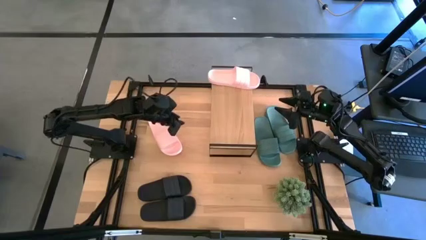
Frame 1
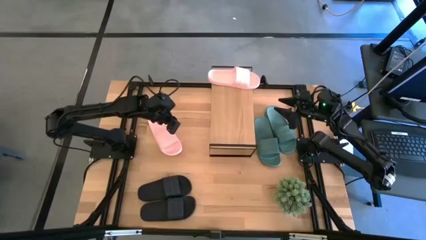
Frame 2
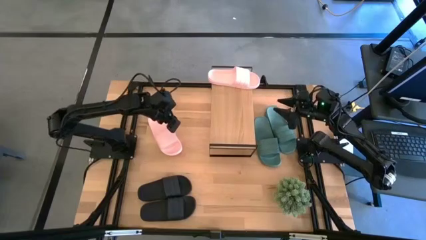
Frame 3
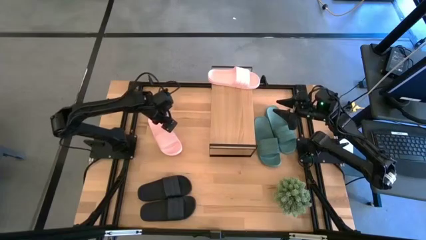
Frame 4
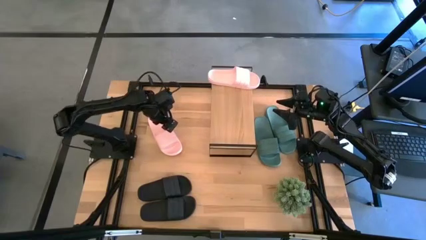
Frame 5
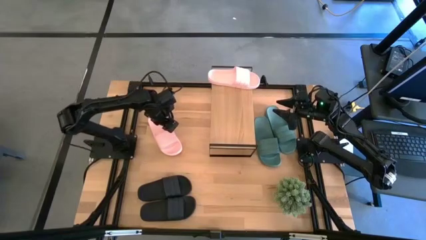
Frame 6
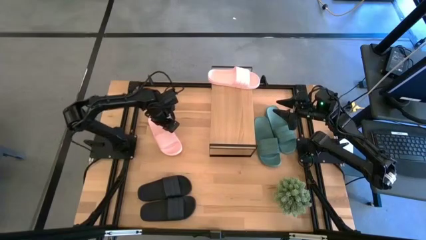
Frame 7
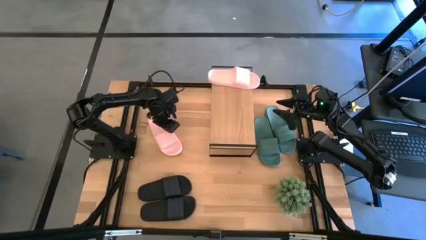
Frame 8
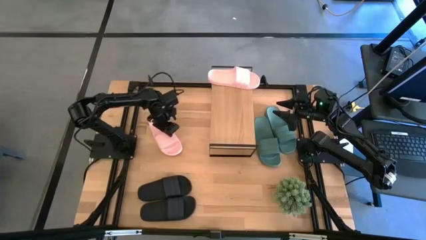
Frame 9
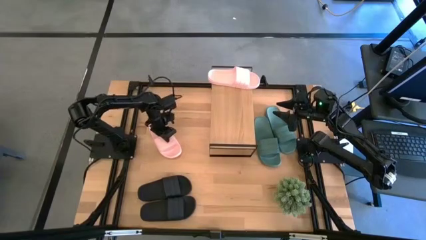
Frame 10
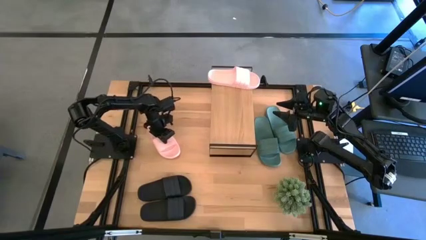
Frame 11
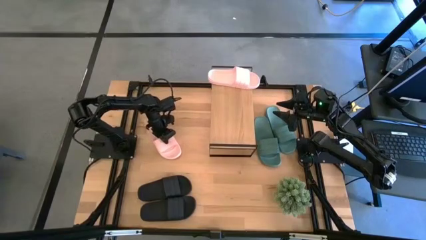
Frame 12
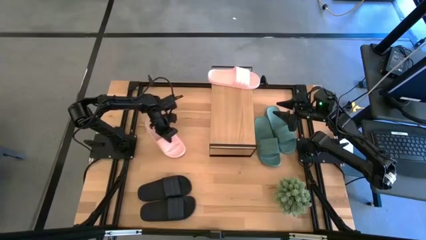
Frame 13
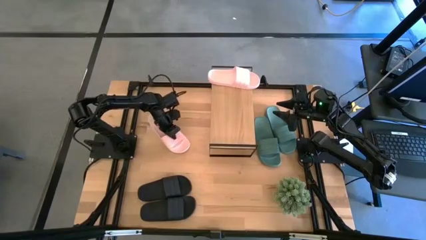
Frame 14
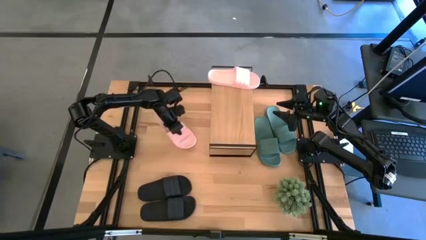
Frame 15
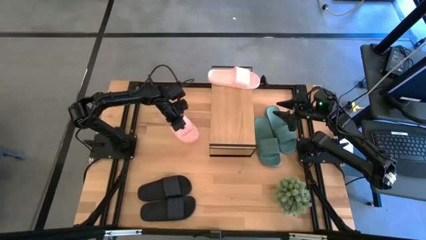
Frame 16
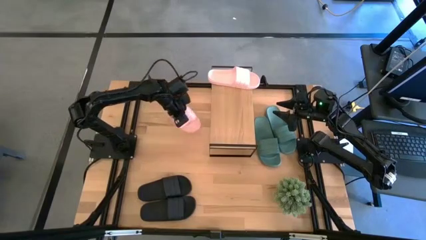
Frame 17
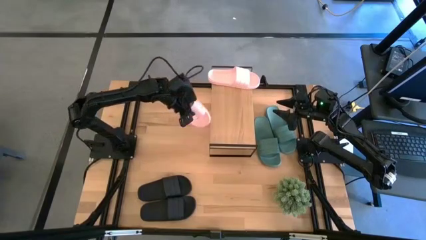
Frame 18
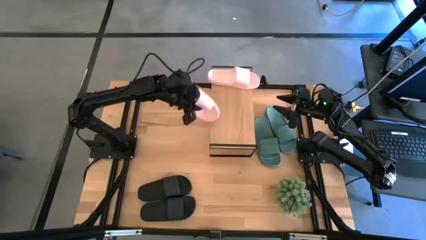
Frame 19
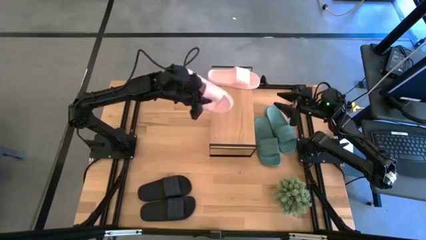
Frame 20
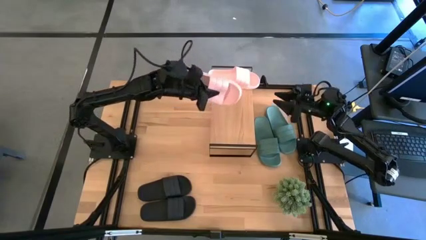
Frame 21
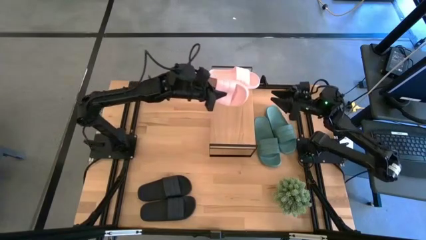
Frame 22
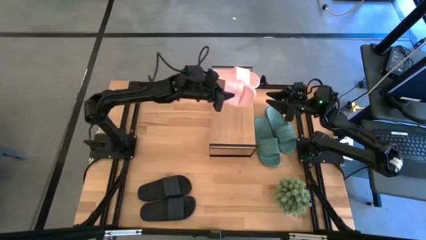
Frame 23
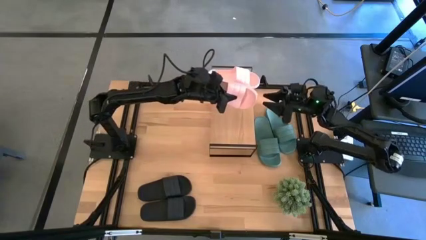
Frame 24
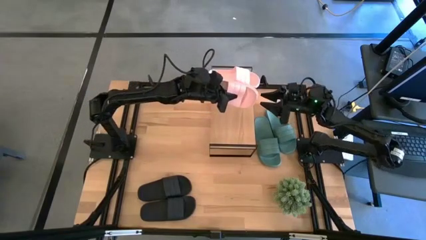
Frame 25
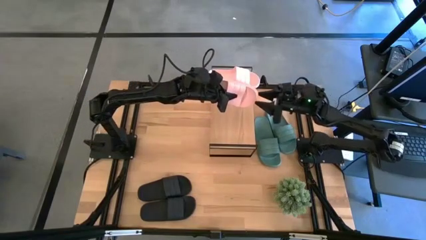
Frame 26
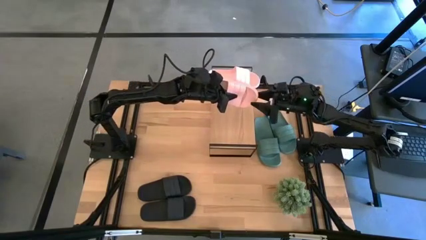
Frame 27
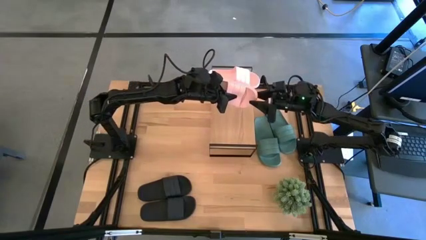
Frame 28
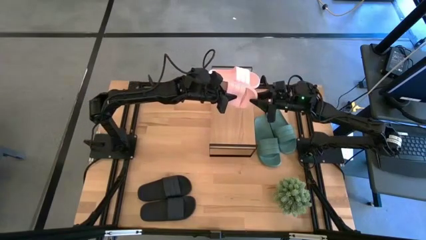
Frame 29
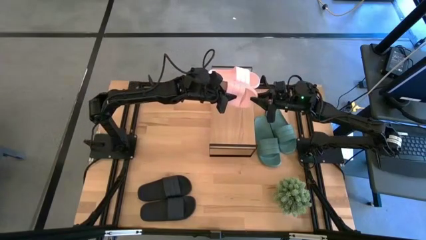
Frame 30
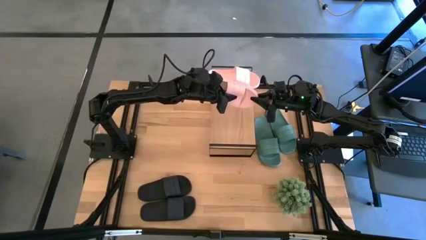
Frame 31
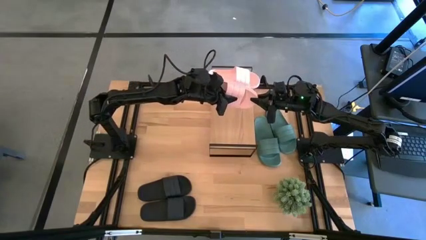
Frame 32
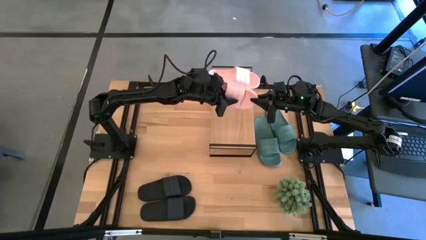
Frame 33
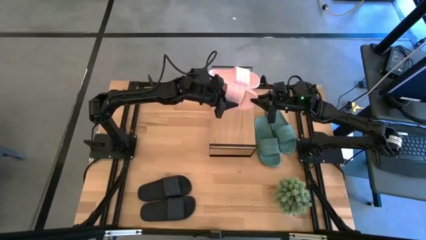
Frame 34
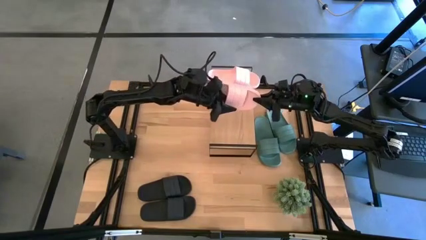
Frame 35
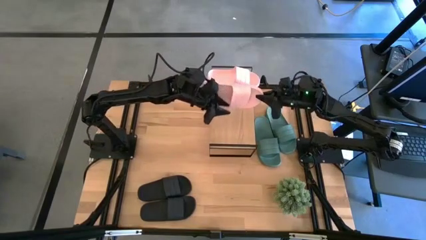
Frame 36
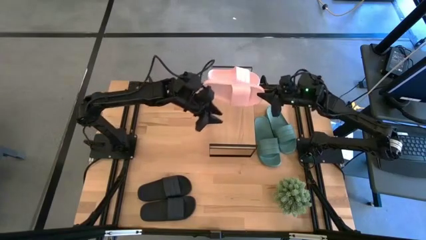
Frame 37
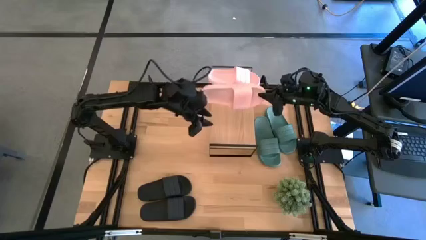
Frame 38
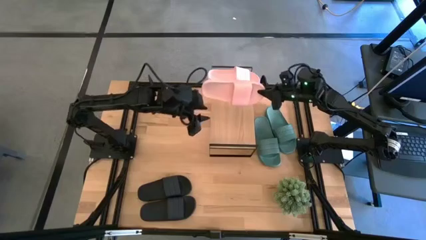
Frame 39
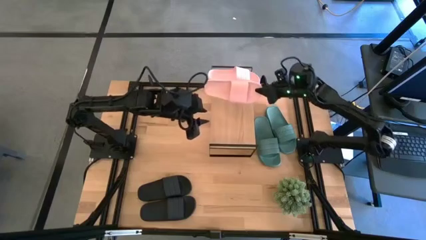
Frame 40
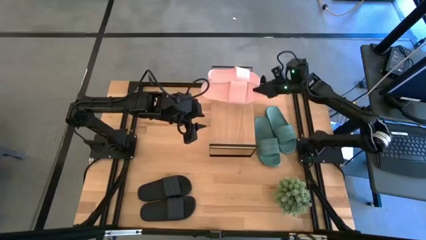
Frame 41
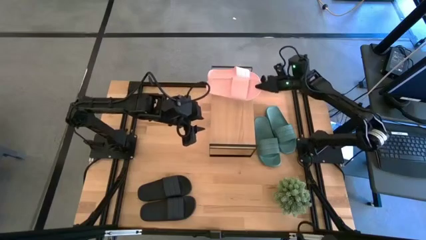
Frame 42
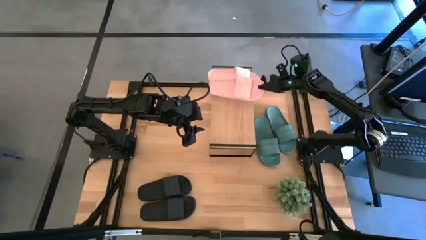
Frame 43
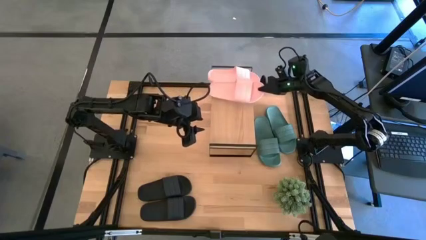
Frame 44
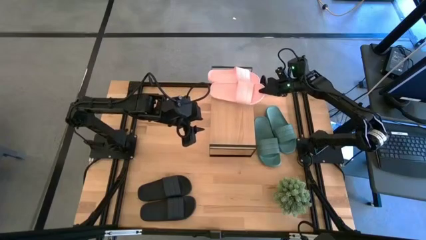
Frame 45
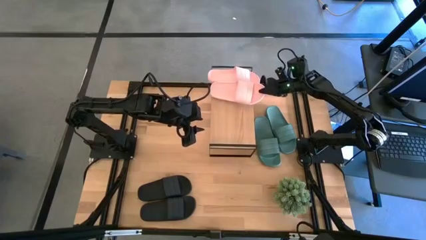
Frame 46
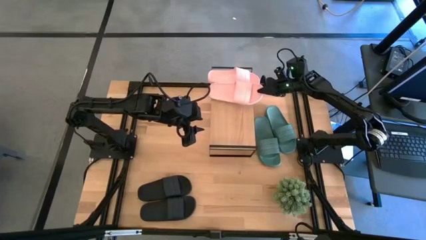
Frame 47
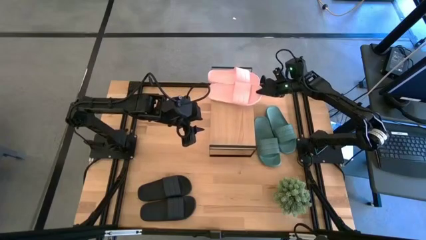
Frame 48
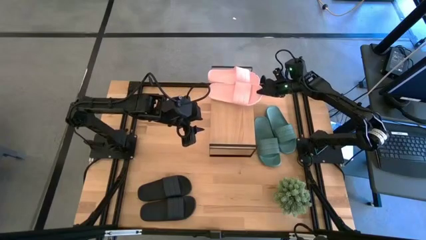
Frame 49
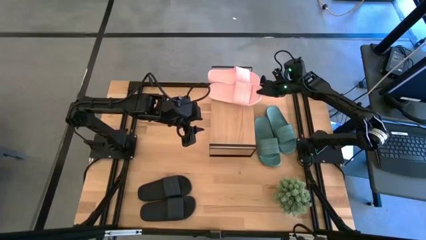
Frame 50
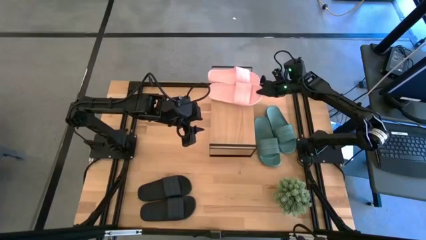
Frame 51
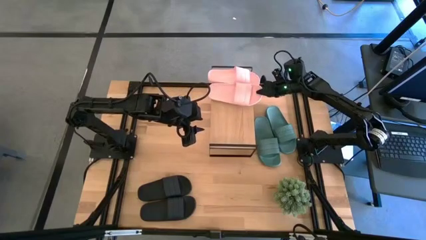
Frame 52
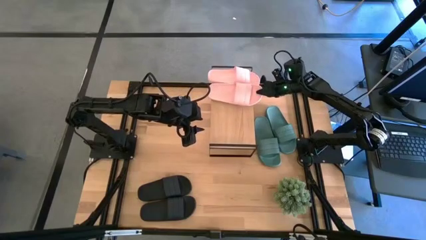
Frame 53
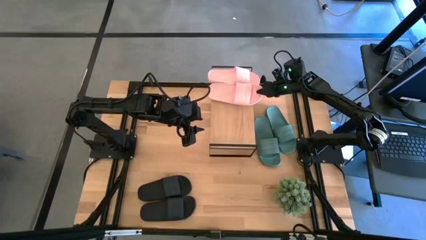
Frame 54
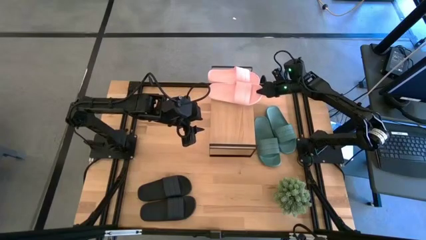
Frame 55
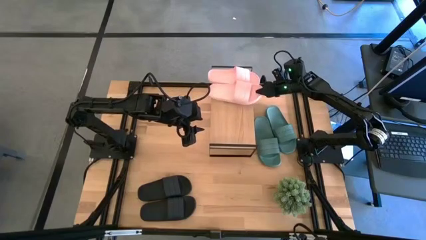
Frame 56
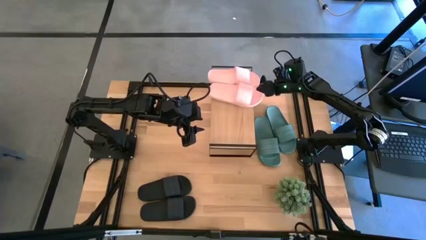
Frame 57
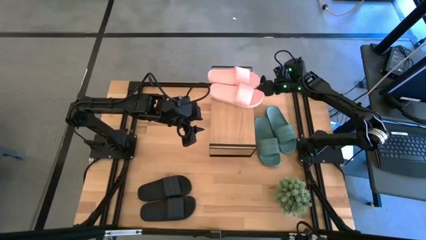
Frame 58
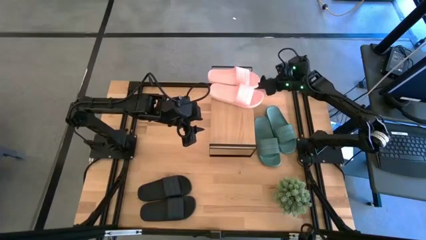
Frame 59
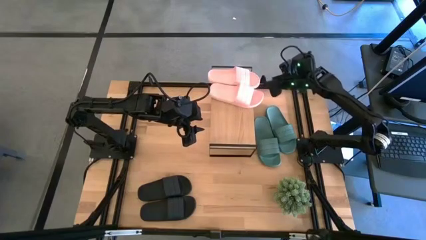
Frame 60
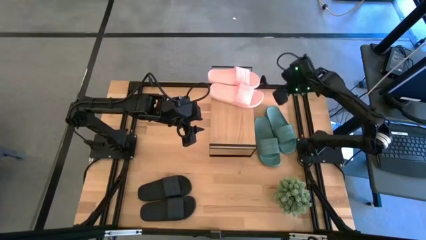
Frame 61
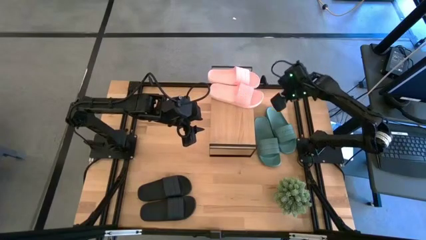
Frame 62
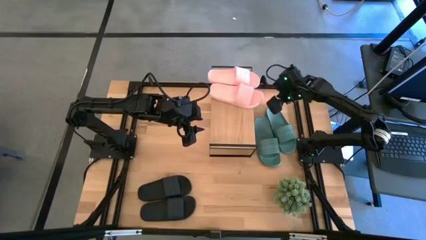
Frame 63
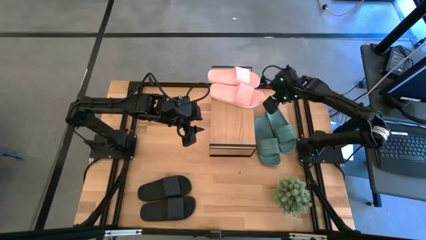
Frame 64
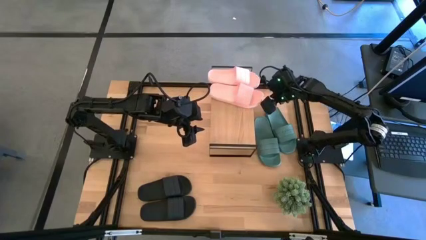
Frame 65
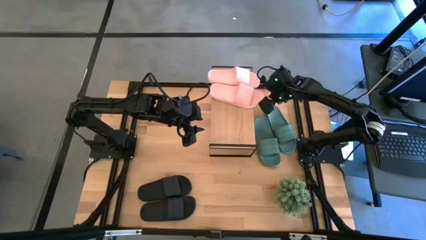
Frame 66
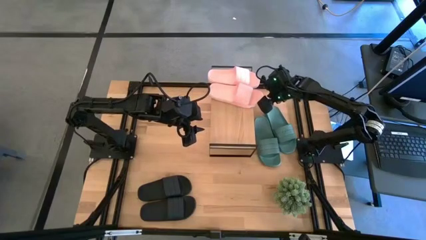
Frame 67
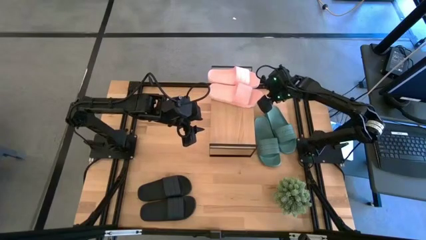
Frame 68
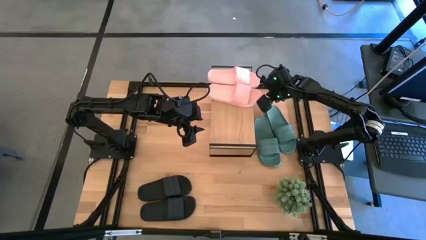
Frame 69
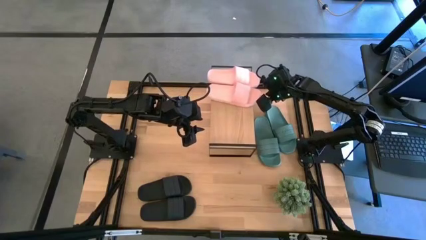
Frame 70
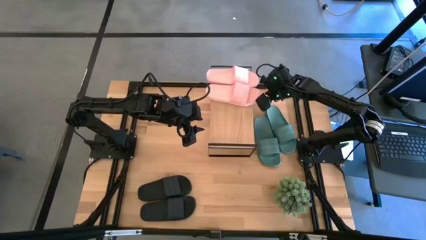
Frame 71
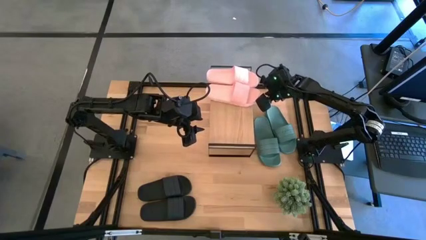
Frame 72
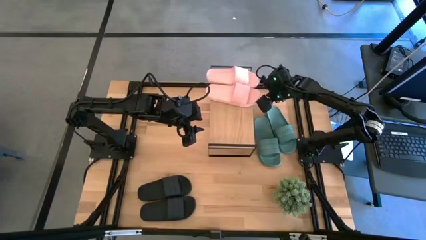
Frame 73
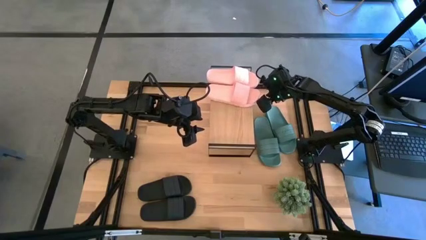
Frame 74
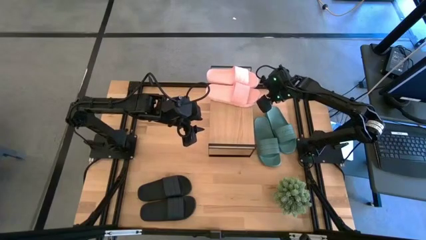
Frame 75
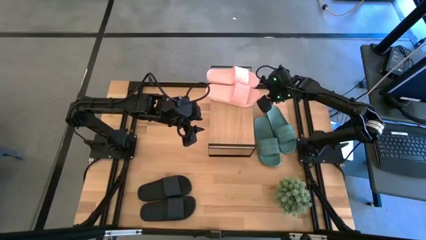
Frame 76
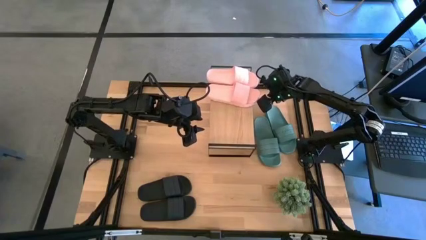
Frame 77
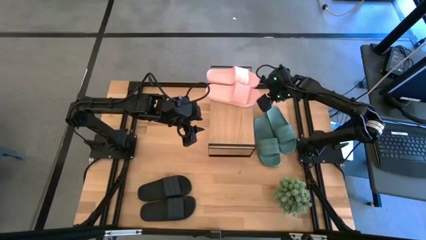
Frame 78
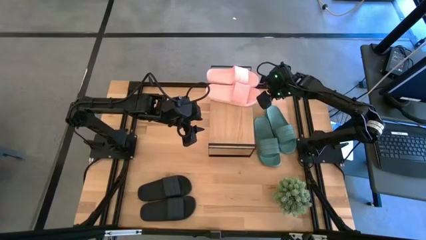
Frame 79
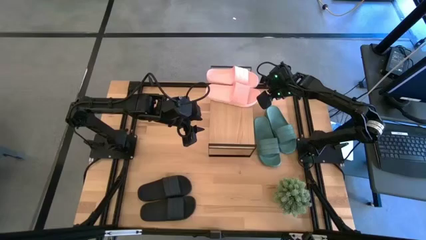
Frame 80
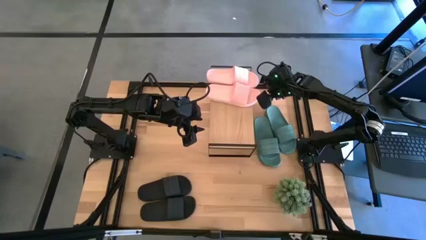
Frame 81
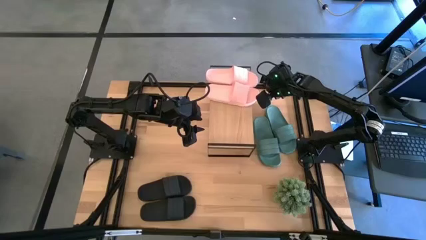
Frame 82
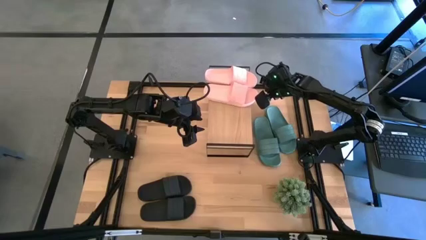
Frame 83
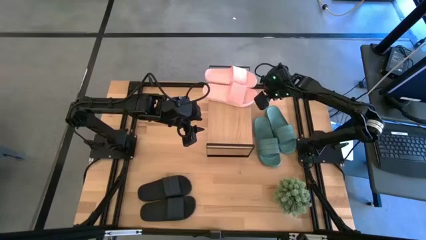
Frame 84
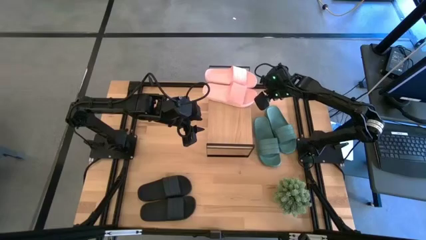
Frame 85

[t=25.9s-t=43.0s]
Task: Pick and place slides into the shelf
Put the pink slide on the shelf
